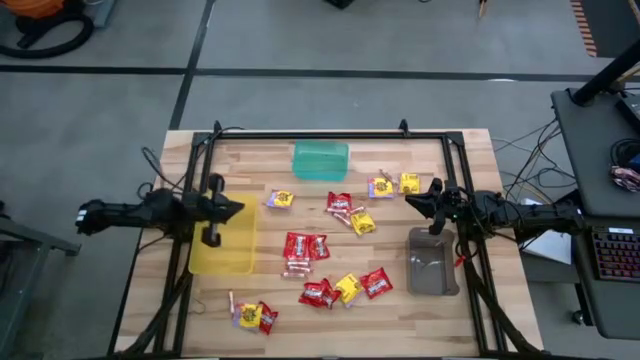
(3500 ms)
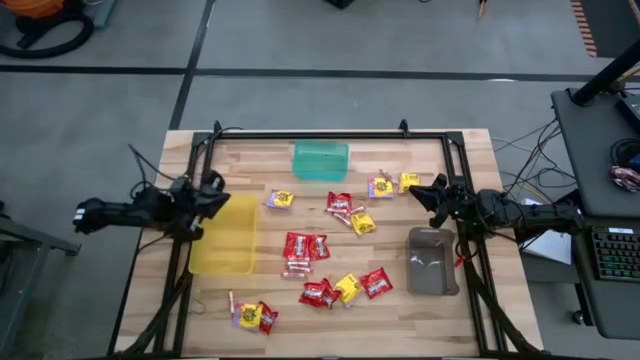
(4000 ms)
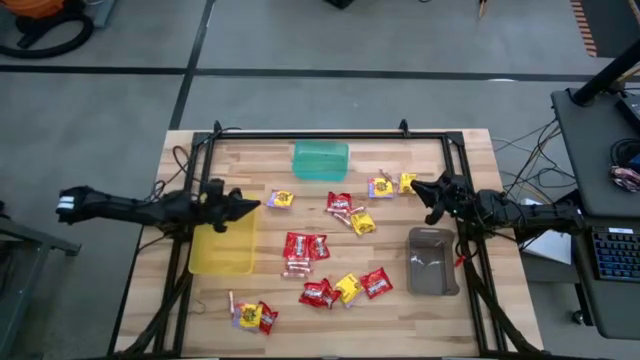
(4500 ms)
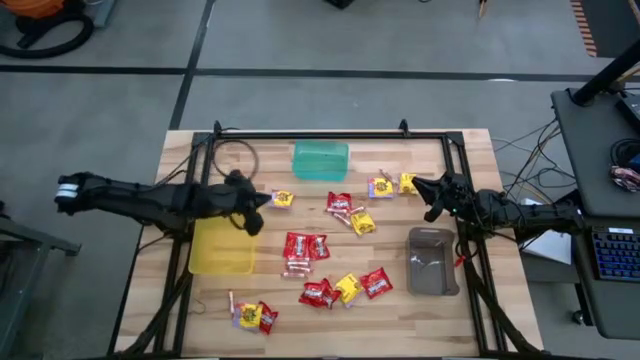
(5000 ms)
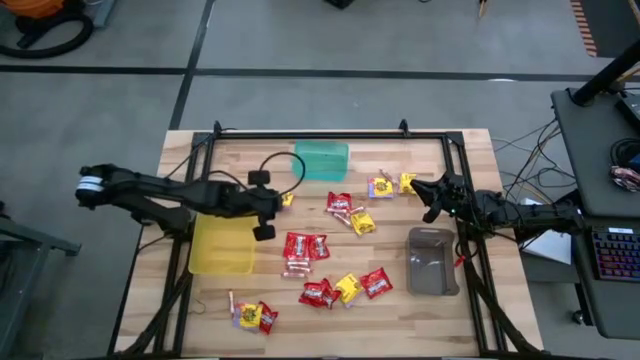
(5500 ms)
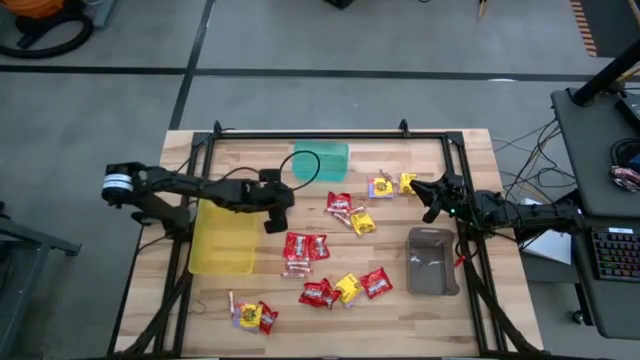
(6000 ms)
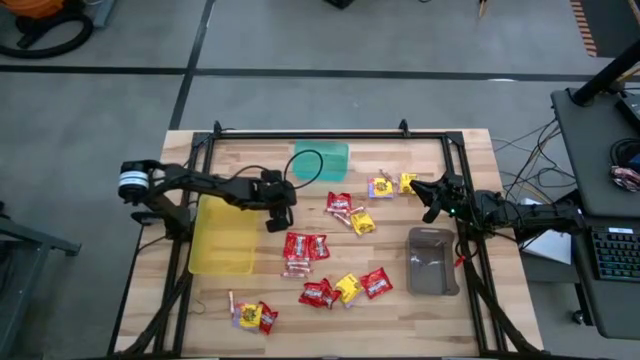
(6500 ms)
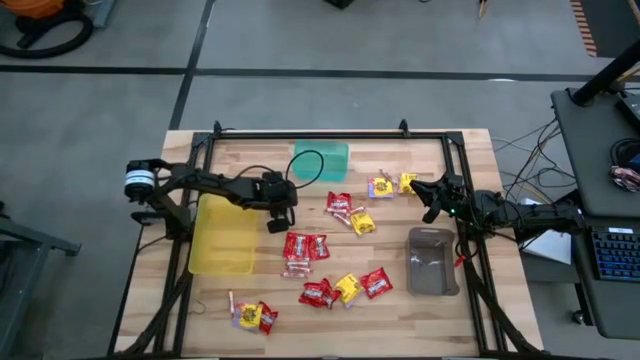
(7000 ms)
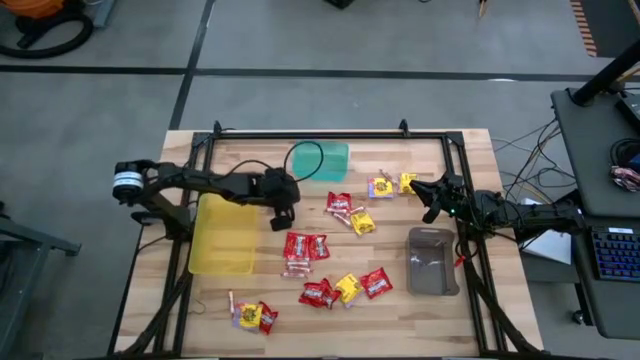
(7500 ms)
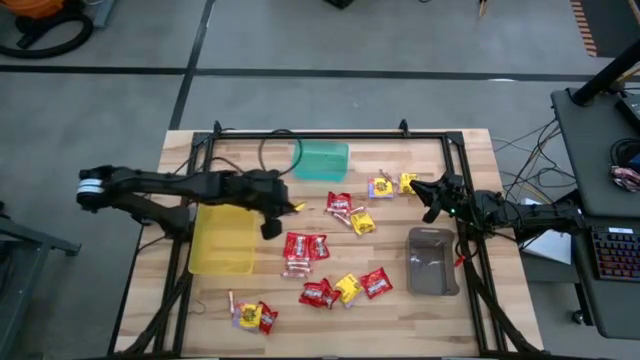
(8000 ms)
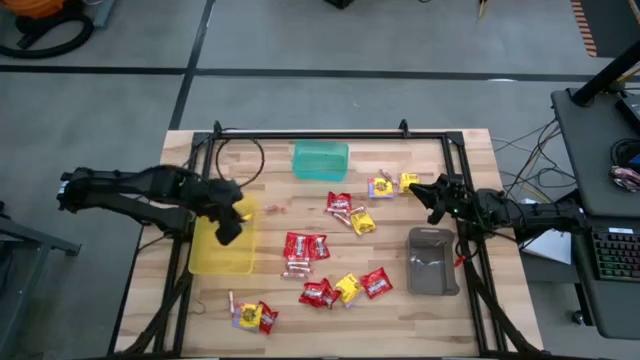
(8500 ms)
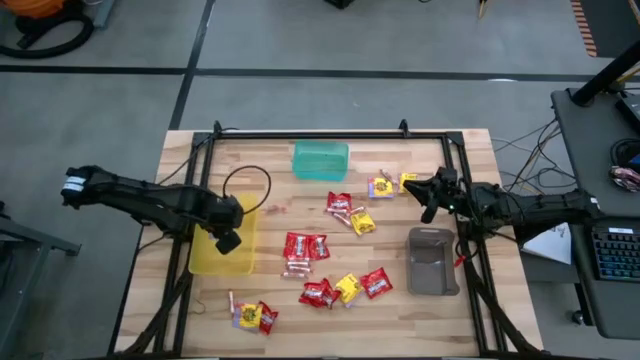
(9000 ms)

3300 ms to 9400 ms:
Task: Sort candy
Put the yellow candy into the yellow bin

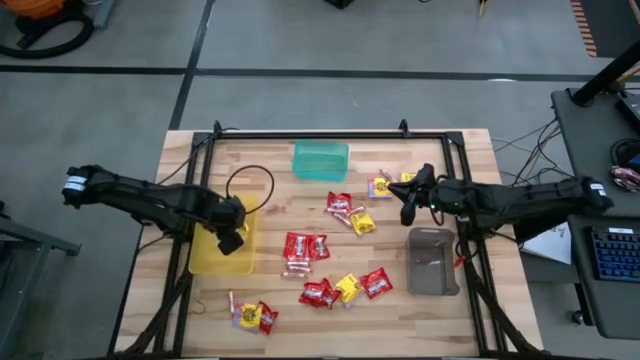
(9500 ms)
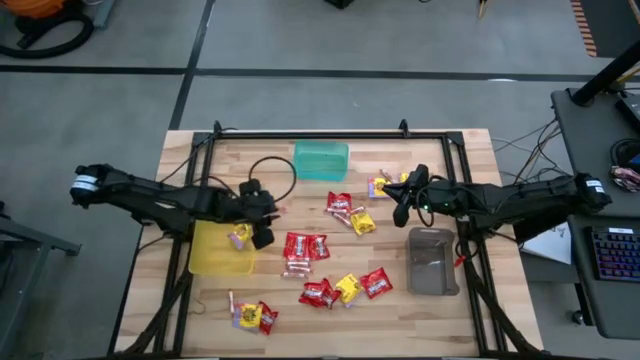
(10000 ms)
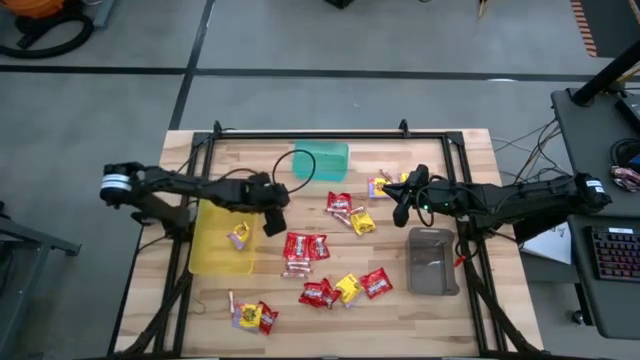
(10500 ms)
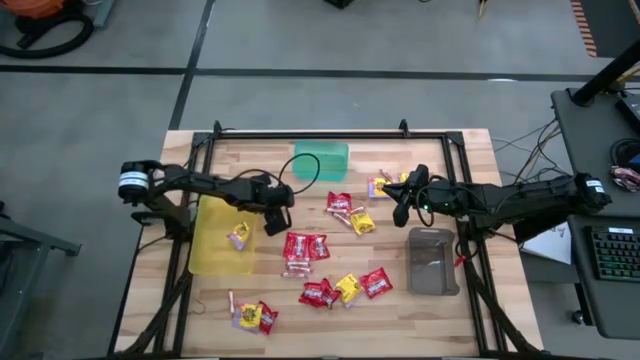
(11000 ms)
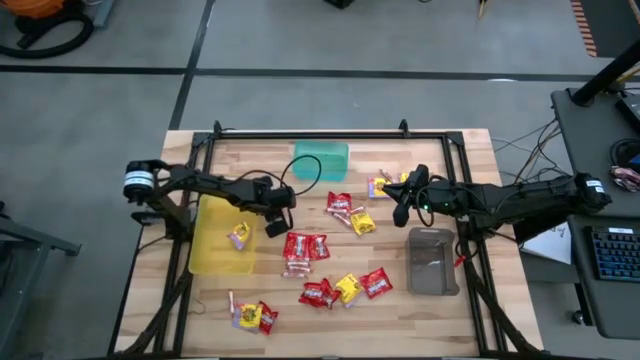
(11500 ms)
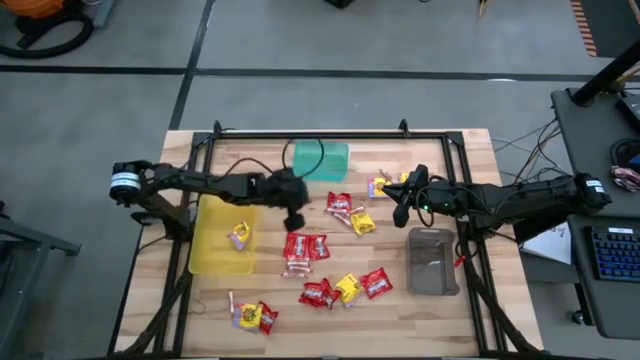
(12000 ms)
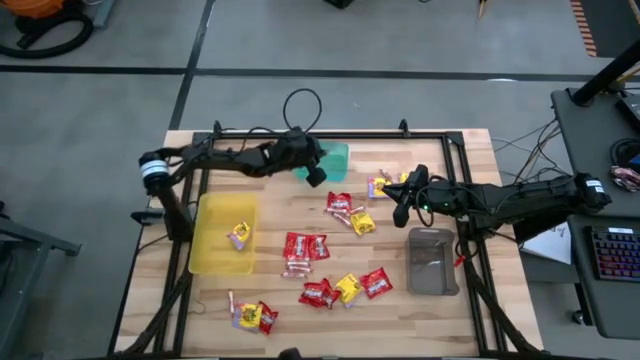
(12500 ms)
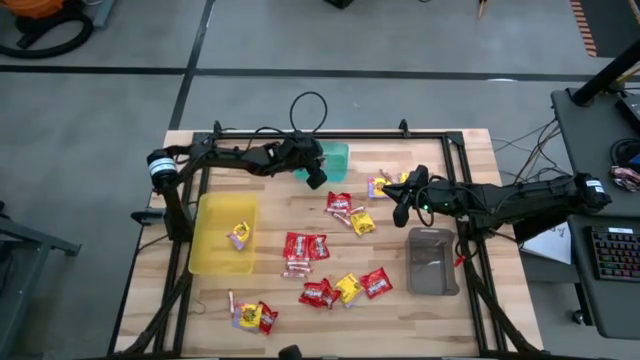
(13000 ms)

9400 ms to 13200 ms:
Put the white candy into the green bin

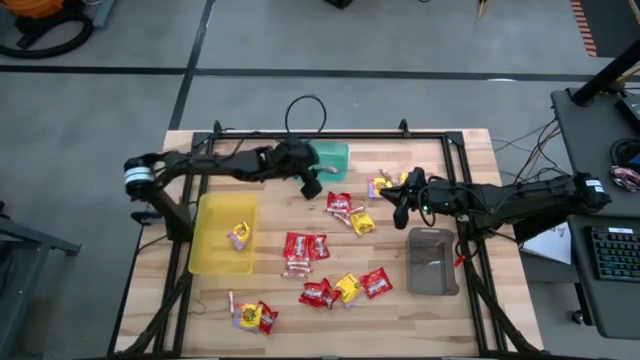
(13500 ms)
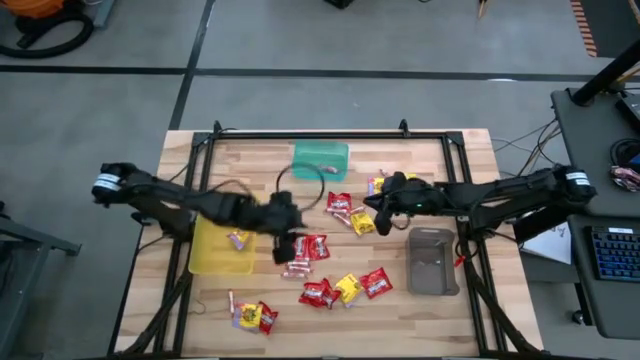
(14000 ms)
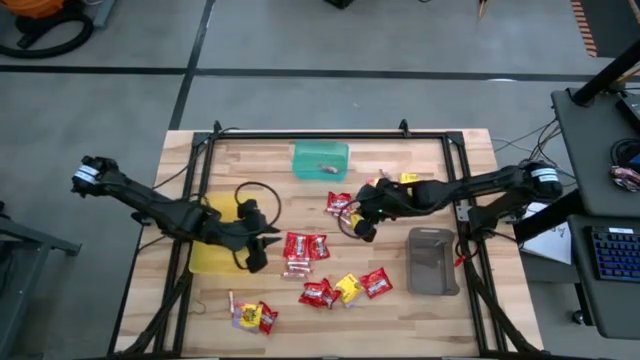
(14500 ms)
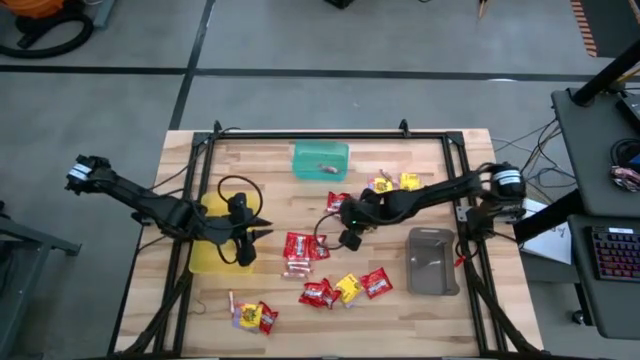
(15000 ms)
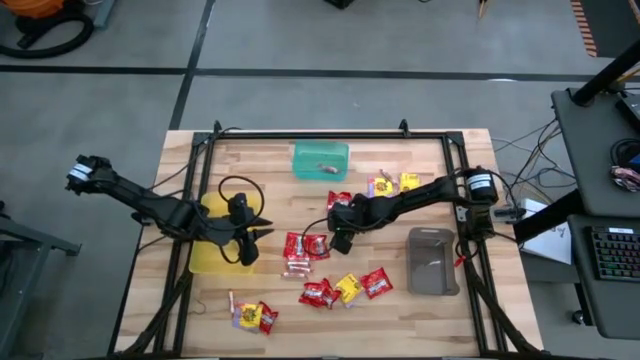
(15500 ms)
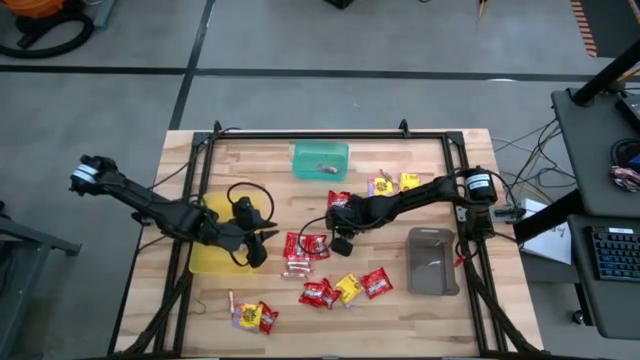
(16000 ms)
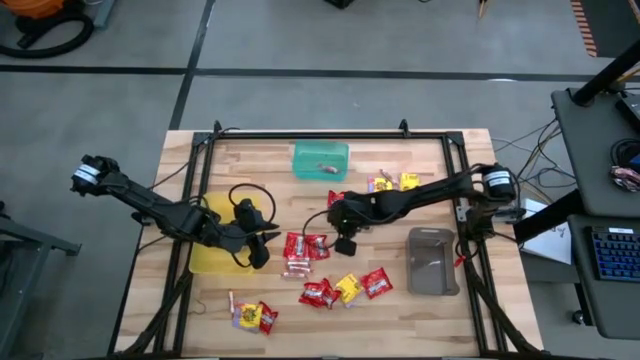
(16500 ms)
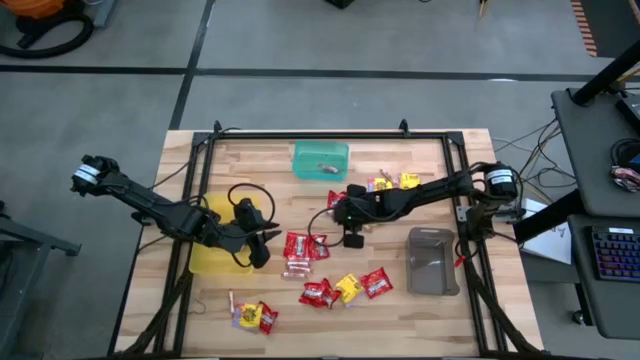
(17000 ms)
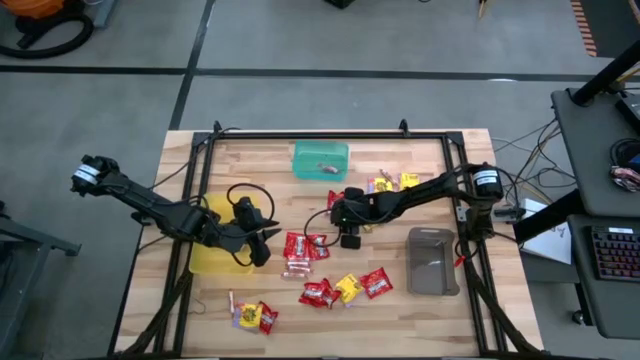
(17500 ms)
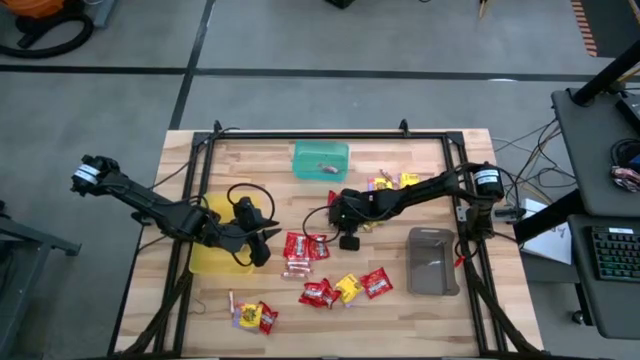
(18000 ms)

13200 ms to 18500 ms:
Put the white candy into the green bin

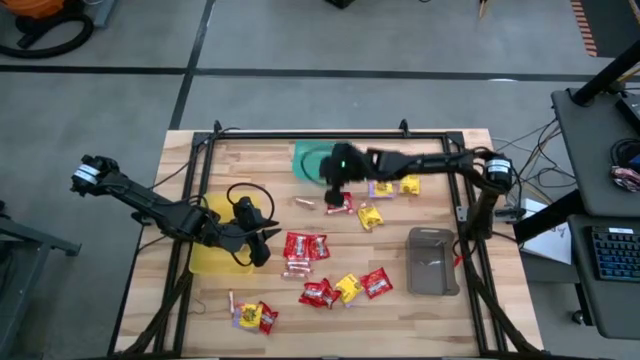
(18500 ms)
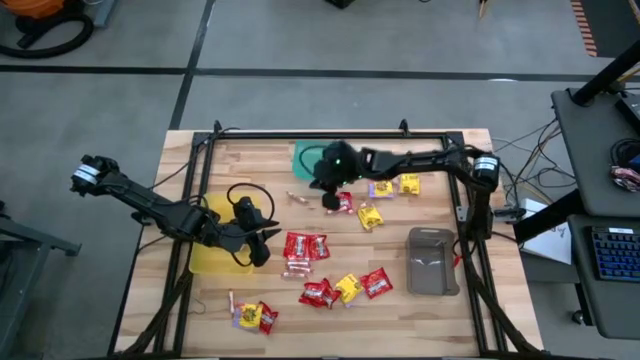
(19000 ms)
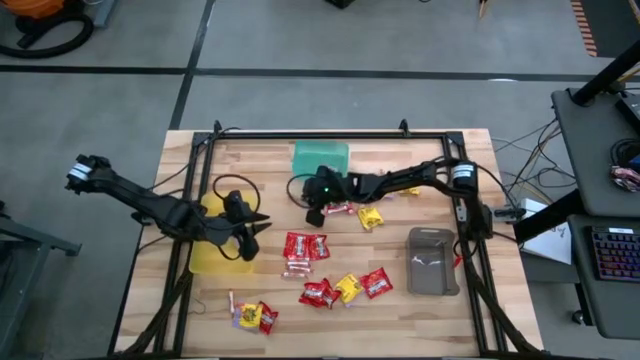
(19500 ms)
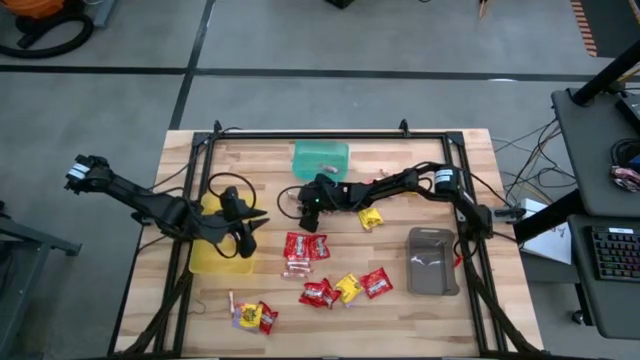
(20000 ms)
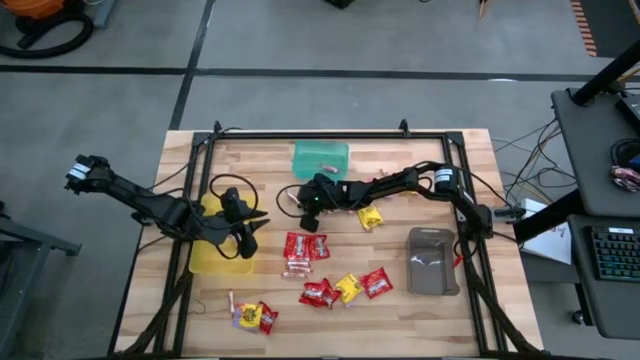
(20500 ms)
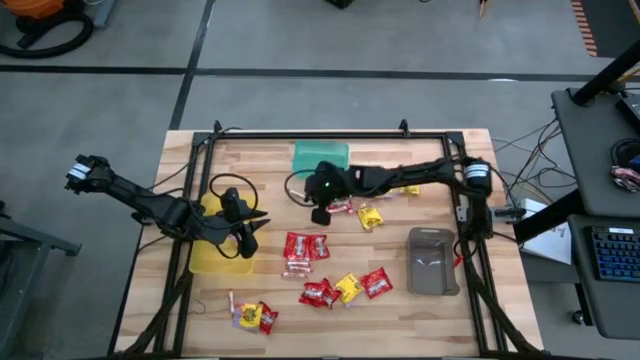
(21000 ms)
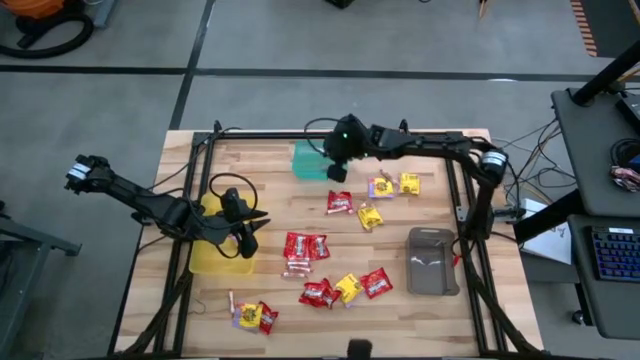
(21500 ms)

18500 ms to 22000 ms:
Put the white candy into the green bin

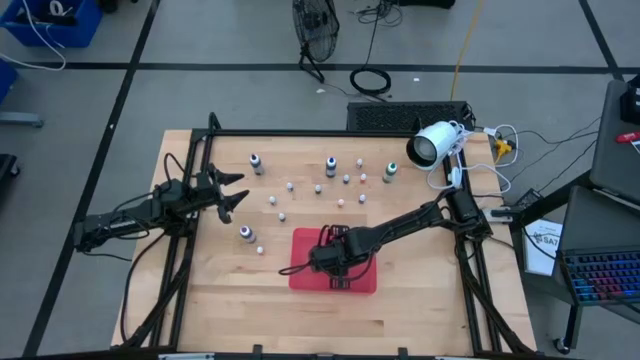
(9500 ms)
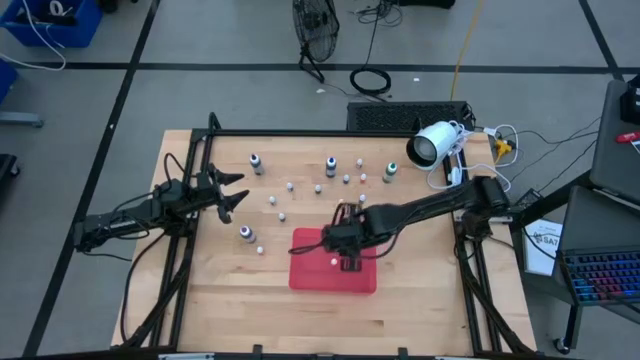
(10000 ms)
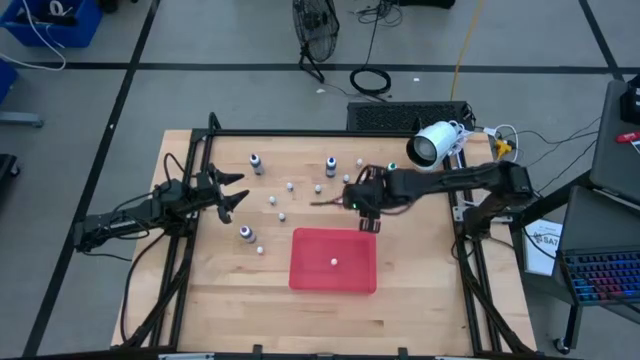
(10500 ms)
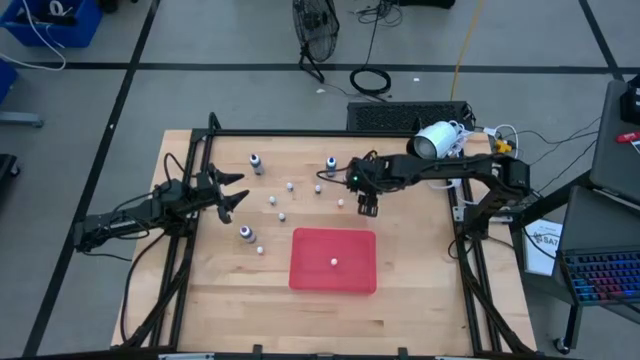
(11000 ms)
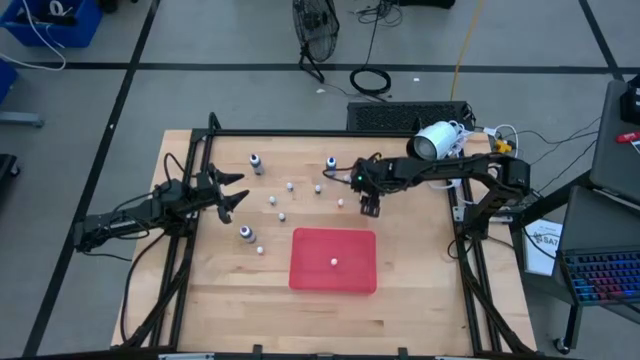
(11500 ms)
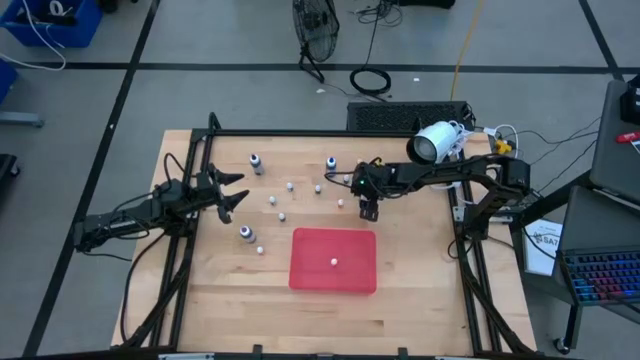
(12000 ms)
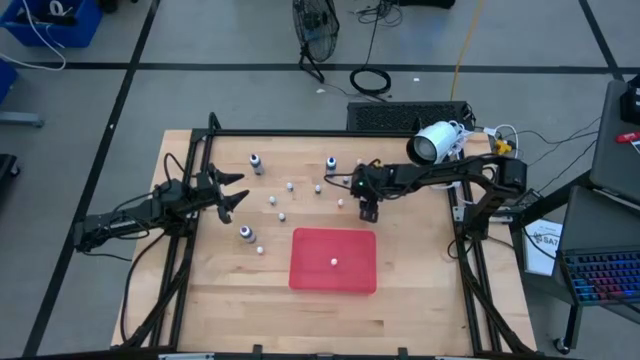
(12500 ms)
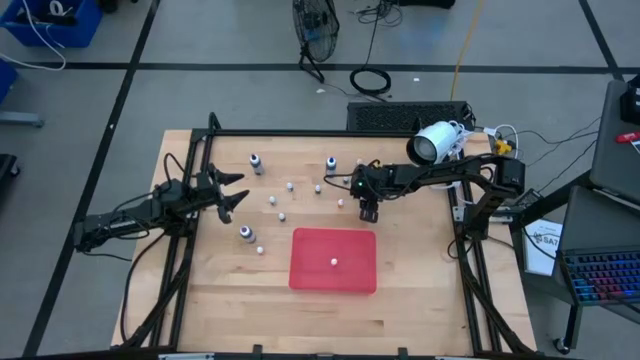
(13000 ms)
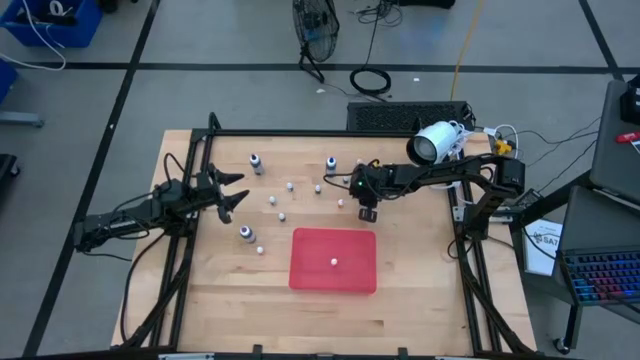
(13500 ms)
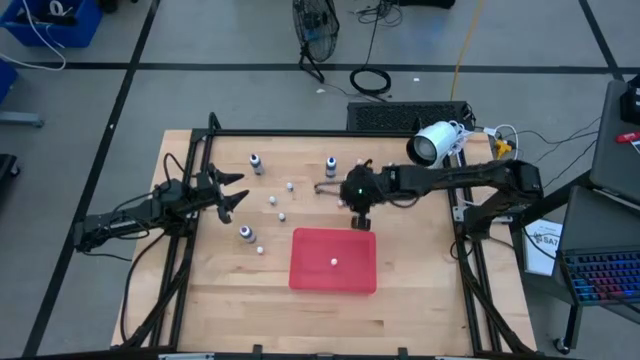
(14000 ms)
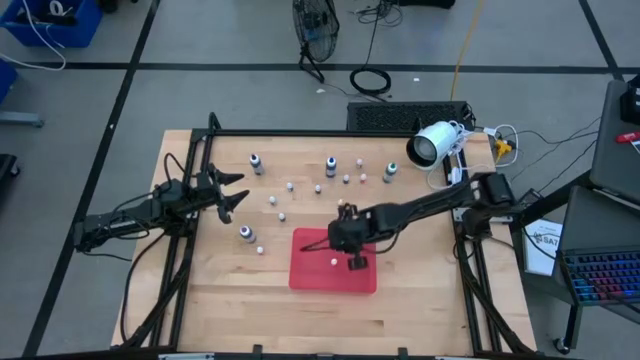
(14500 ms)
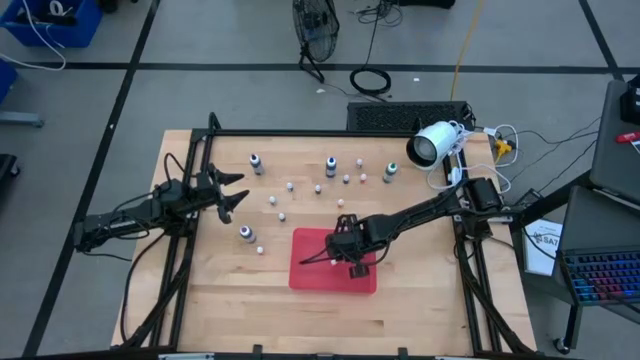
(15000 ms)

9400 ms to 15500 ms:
Task: Pick & Place food coloring
Put the small violet food coloring bottle into the red bin
